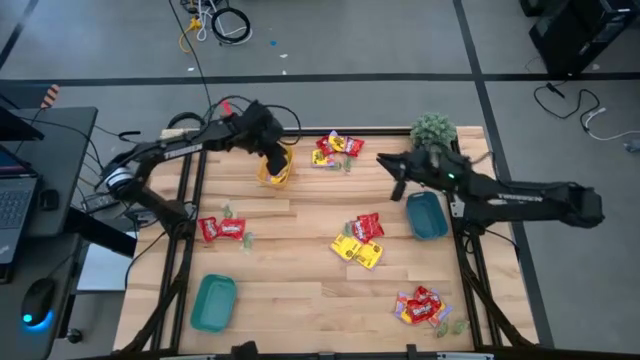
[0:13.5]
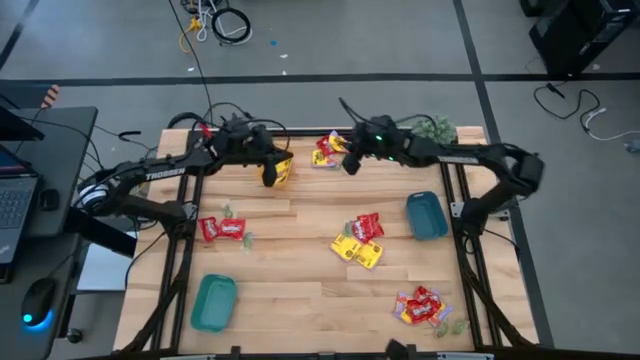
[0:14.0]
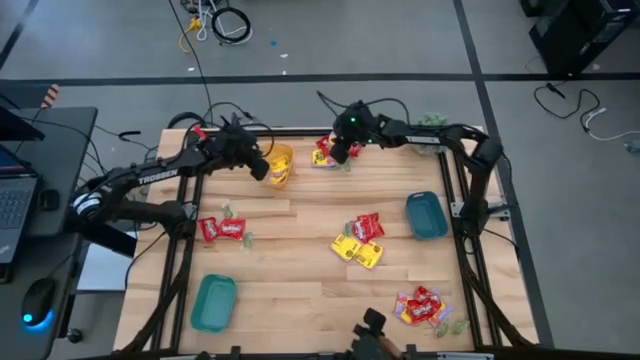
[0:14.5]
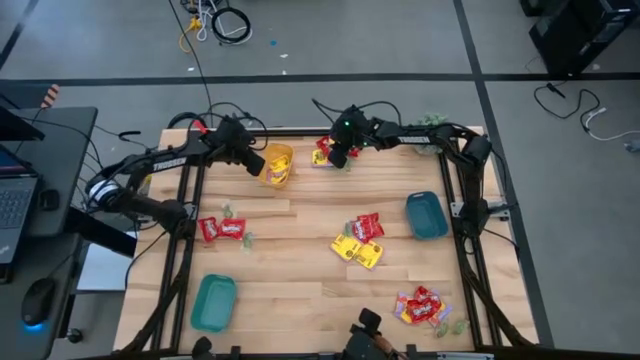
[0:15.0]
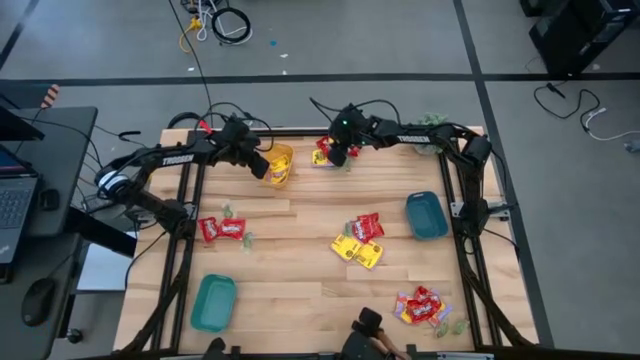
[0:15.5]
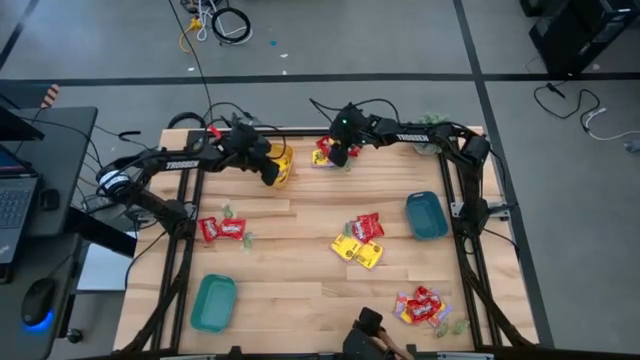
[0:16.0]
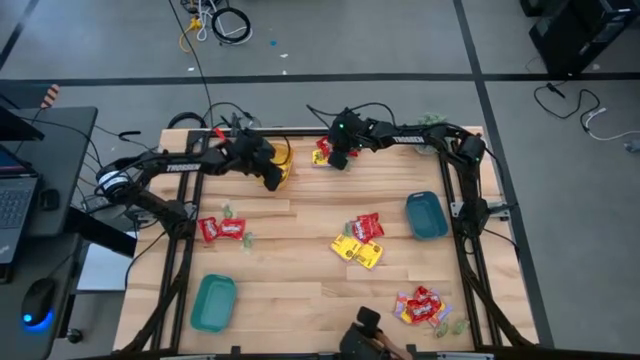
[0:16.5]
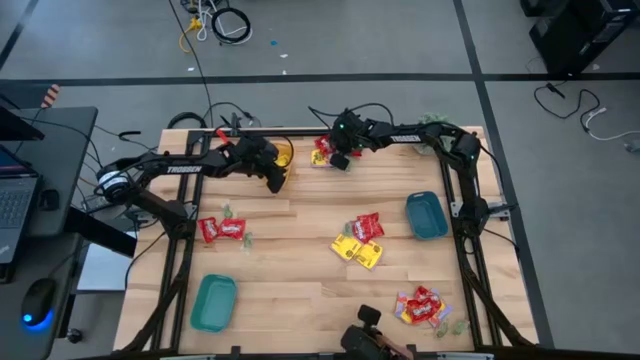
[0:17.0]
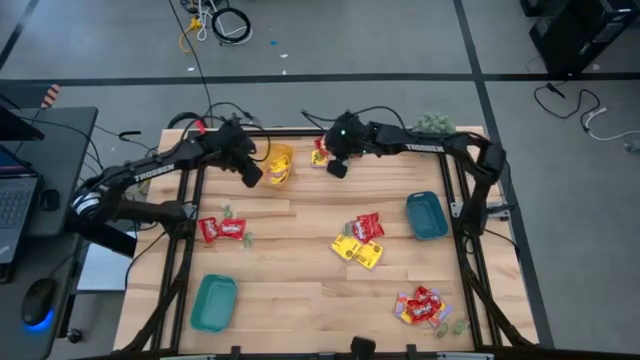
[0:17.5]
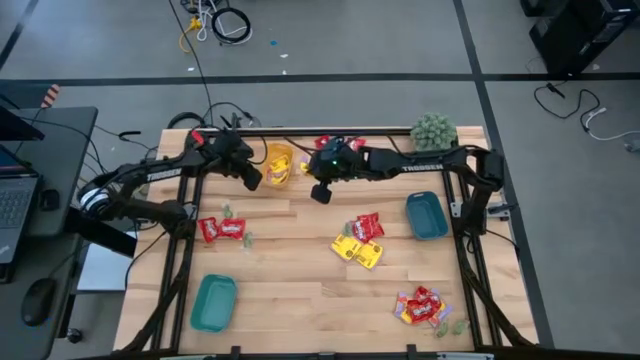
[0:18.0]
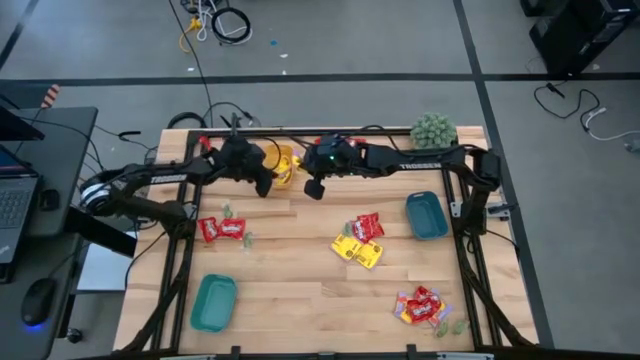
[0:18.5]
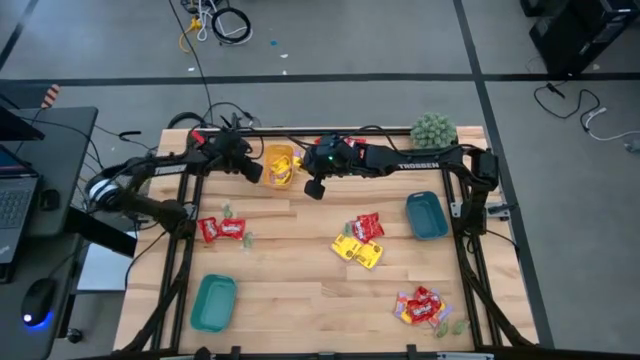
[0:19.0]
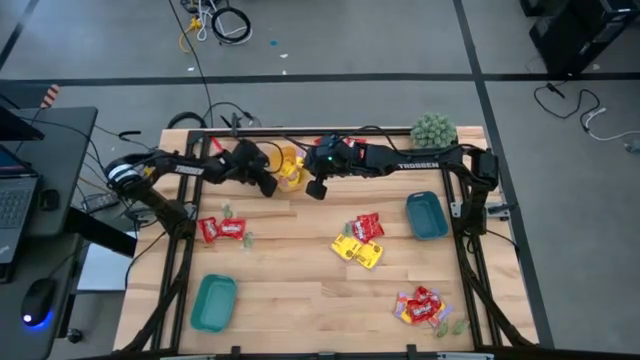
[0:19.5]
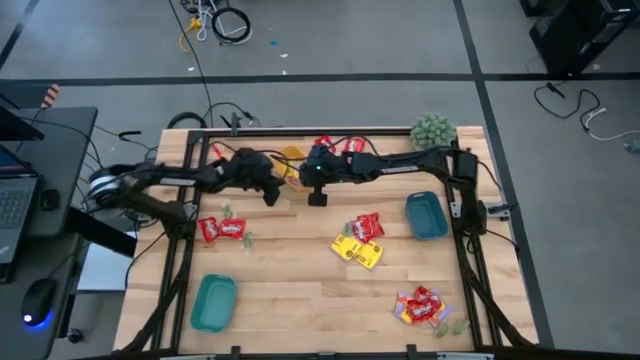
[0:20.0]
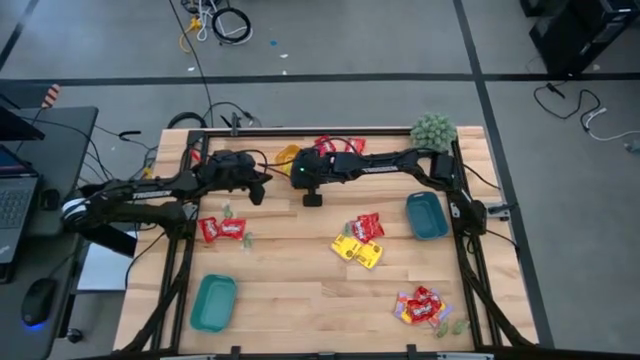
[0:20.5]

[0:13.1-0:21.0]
Task: Sort candy
Put the yellow packet of candy into the yellow bin

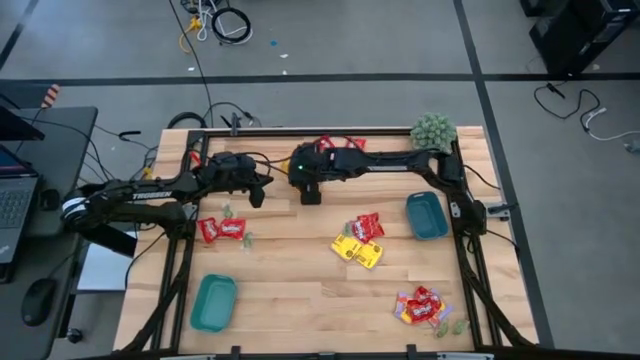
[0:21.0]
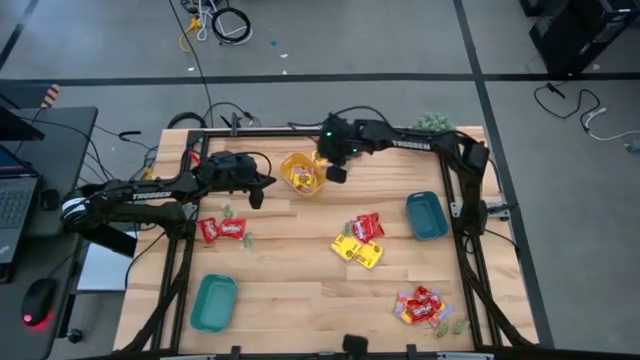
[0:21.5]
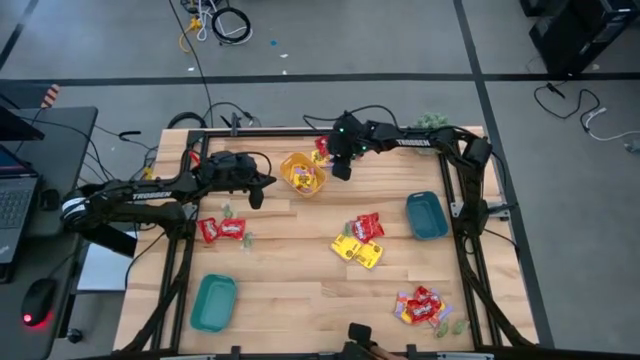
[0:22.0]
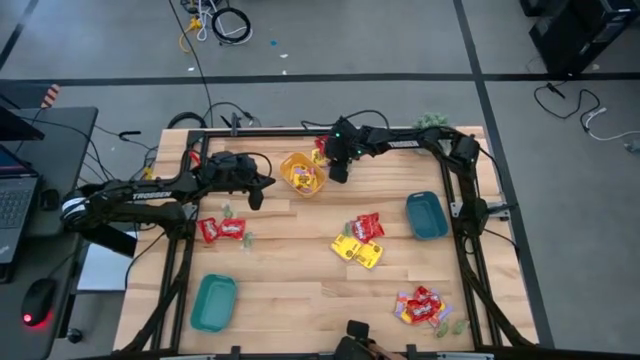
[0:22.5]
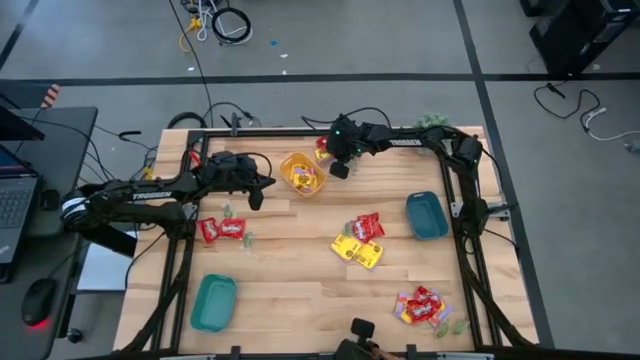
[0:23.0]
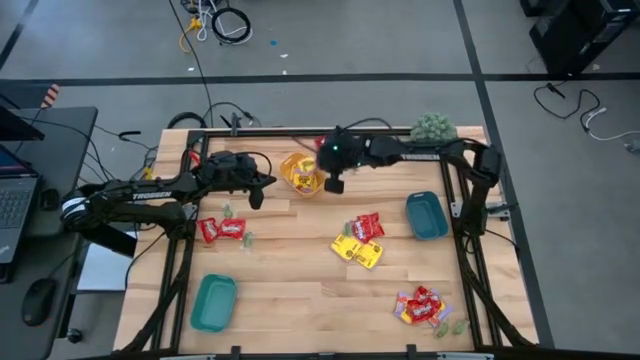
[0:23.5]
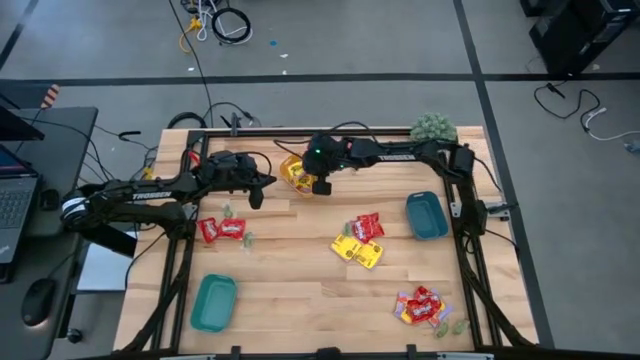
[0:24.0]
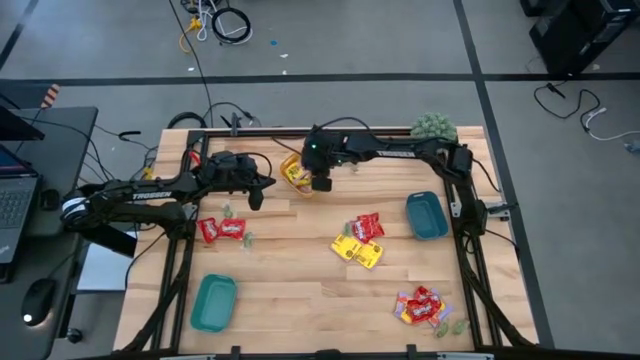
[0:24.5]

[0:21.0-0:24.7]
Put the yellow packet of candy into the yellow bin

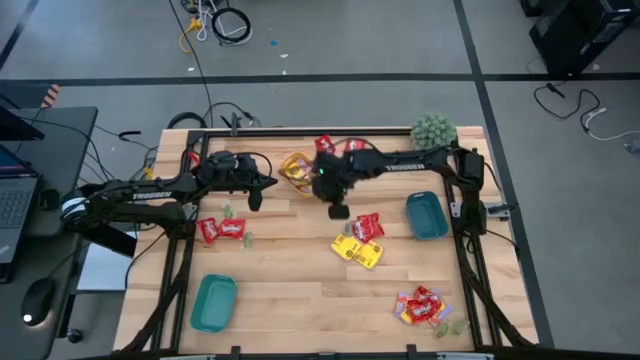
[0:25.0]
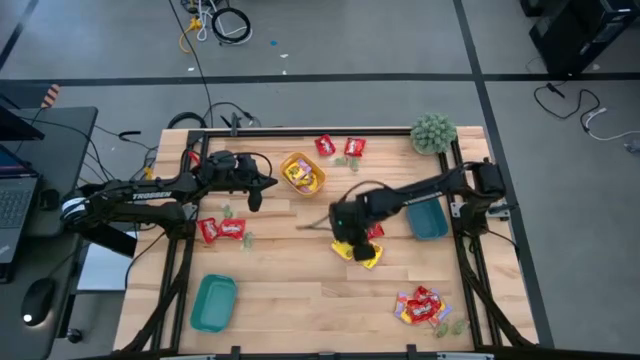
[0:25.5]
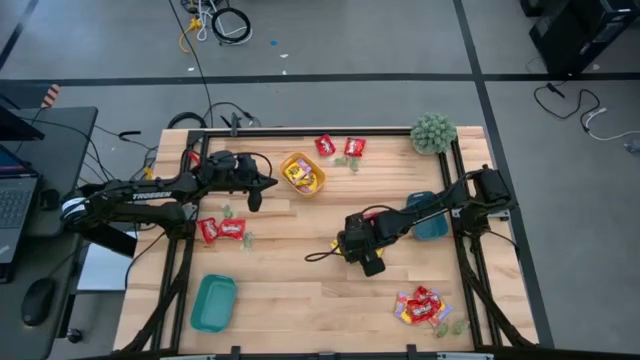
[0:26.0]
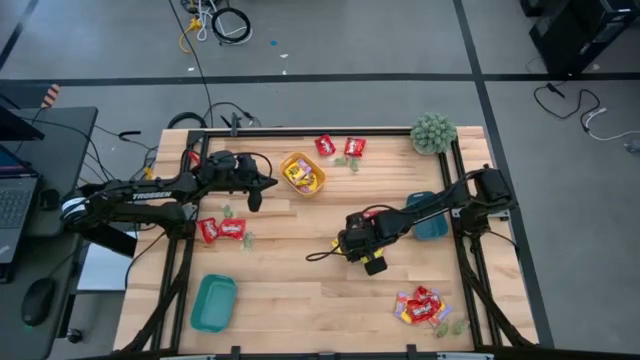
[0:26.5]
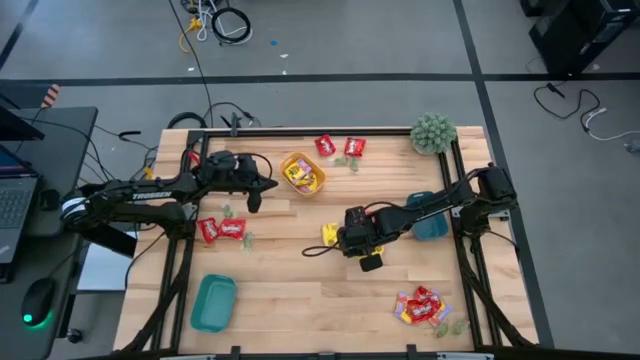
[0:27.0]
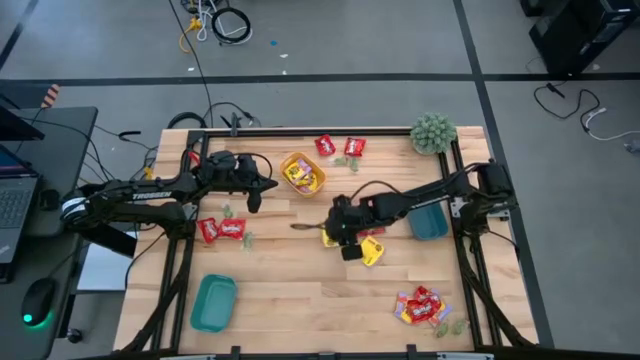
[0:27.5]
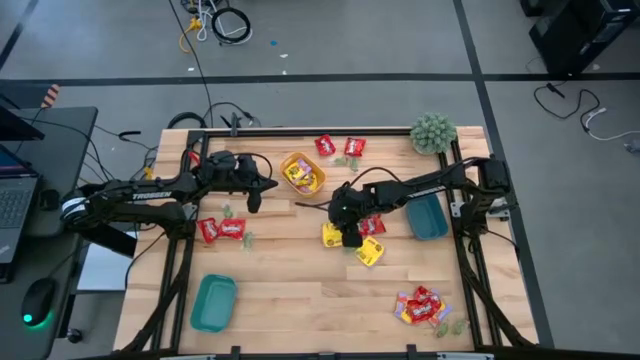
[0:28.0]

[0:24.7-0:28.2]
Put the packet of yellow candy into the yellow bin

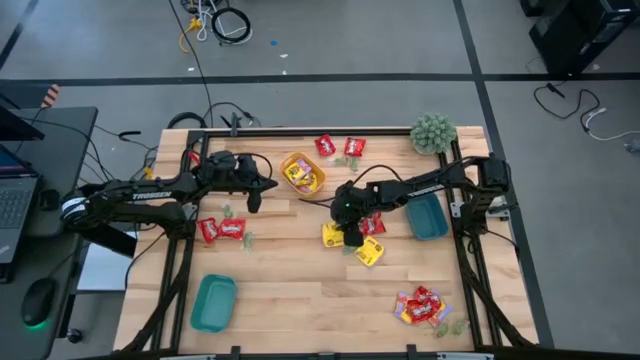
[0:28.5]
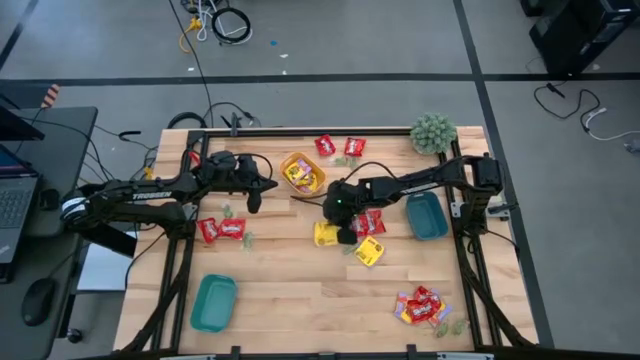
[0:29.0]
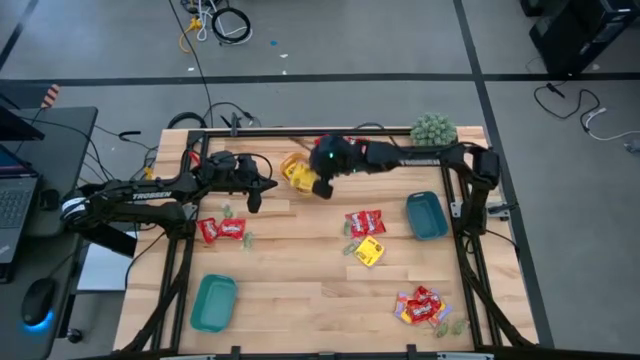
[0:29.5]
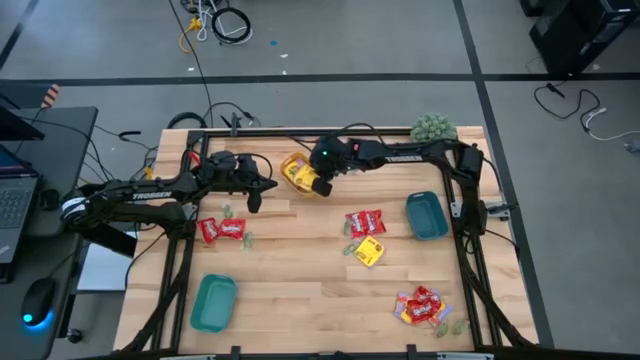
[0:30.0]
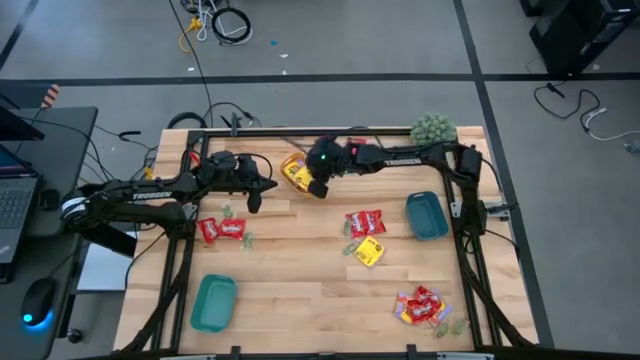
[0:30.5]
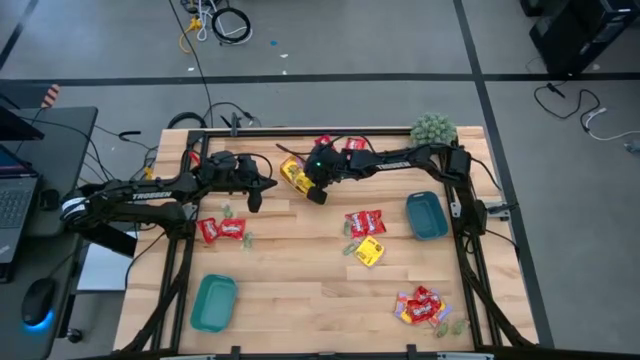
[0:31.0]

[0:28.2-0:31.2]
Put the yellow packet of candy into the yellow bin

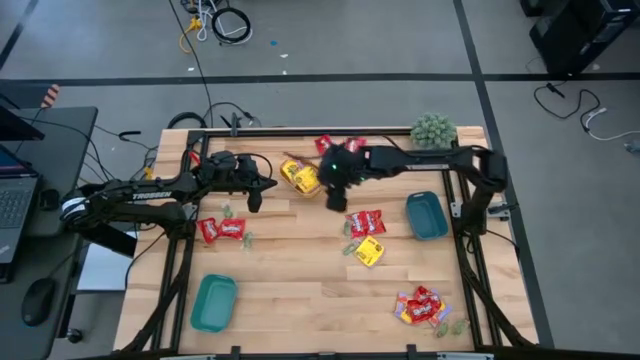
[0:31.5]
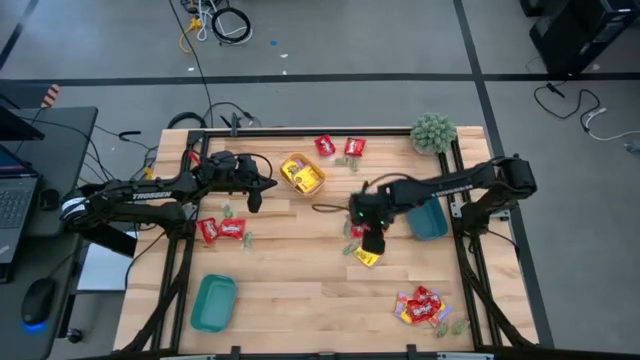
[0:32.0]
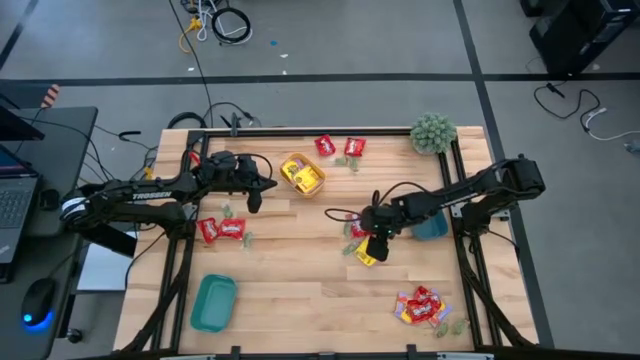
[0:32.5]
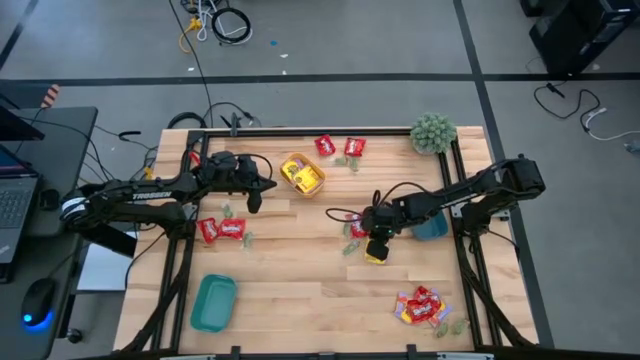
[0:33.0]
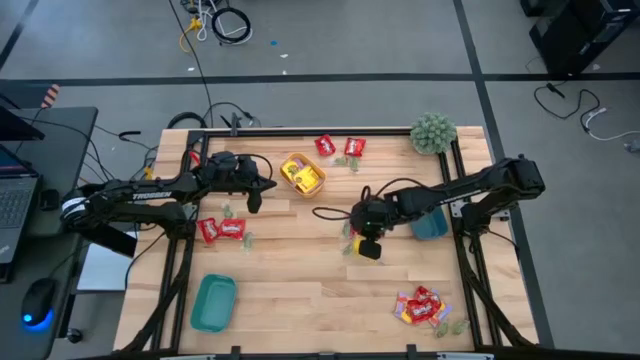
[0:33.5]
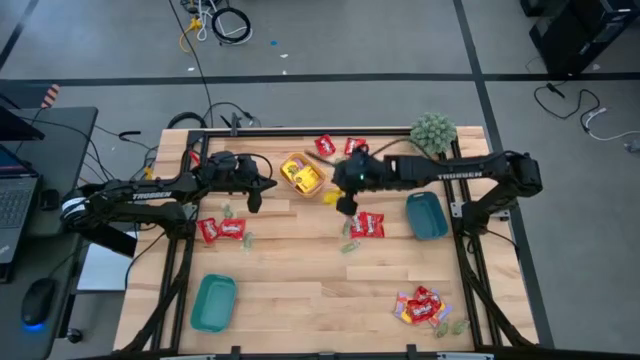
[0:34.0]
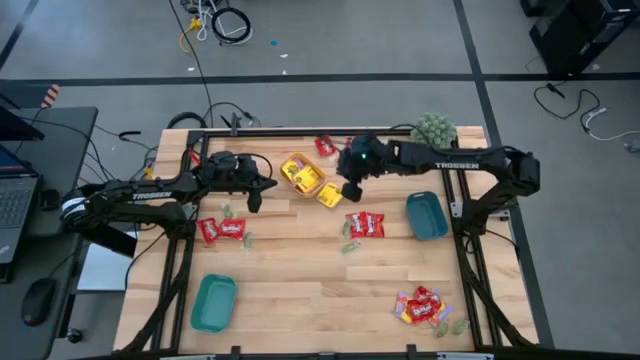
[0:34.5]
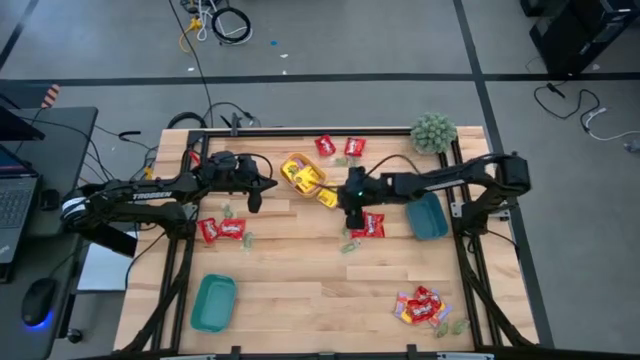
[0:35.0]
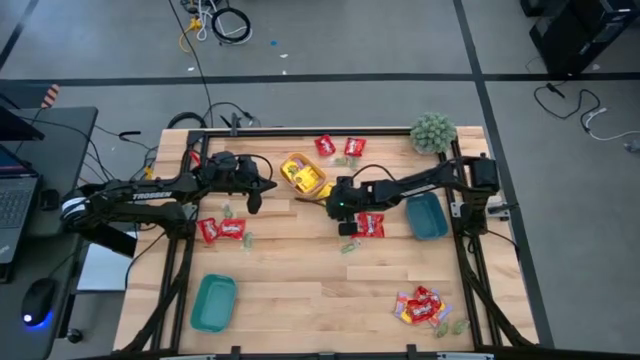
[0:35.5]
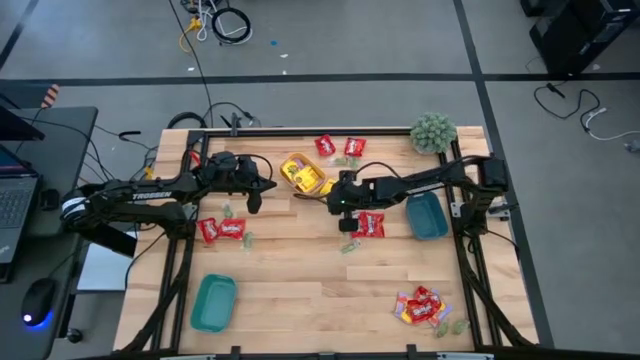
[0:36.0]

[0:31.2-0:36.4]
Put the yellow packet of candy into the yellow bin
